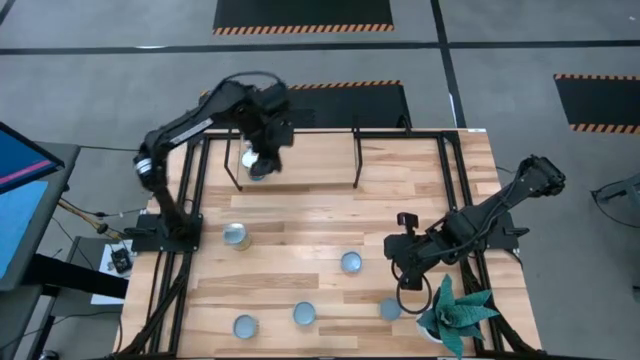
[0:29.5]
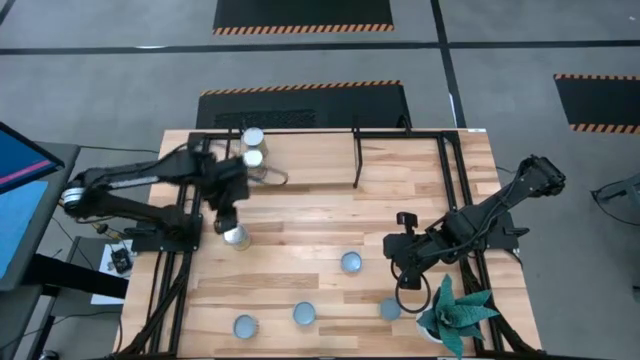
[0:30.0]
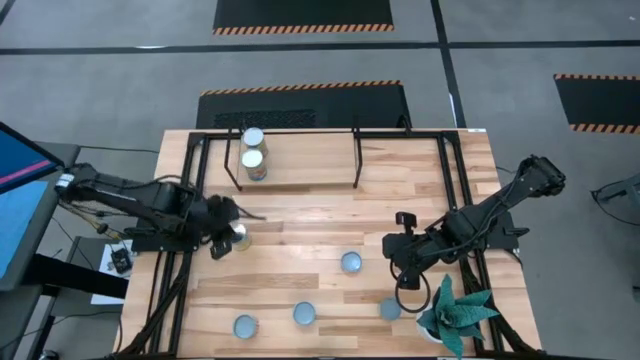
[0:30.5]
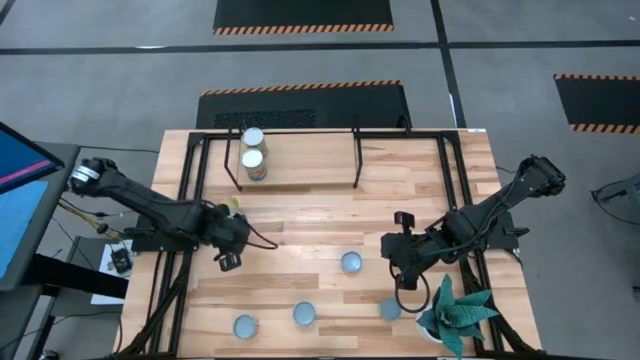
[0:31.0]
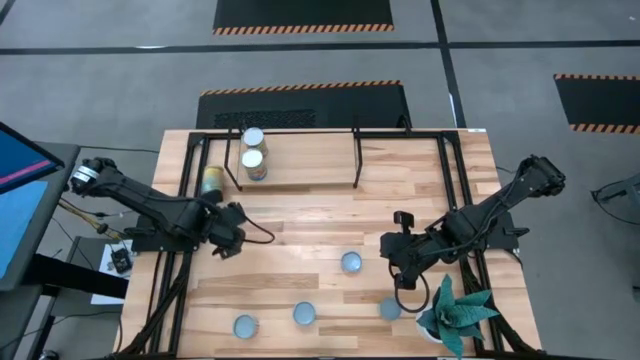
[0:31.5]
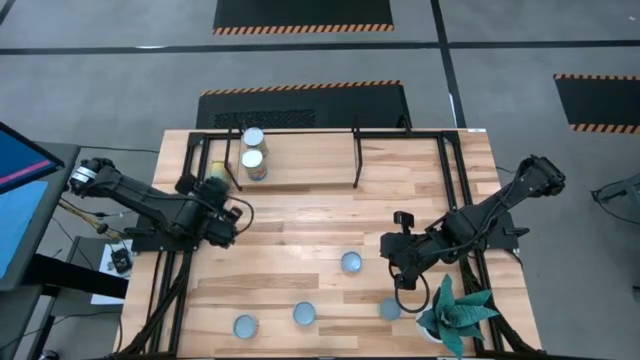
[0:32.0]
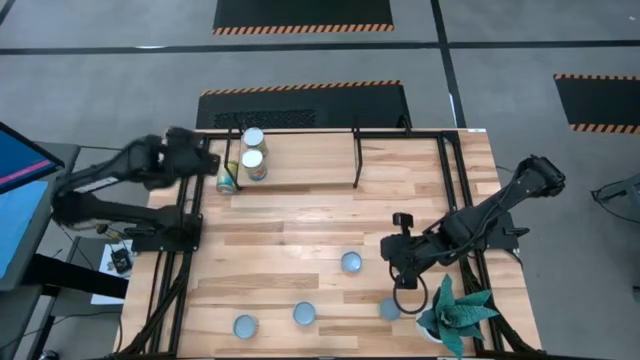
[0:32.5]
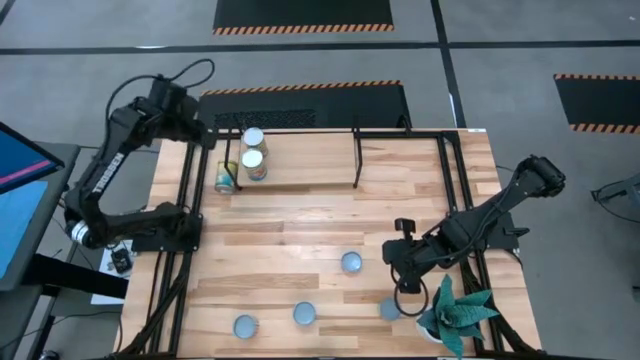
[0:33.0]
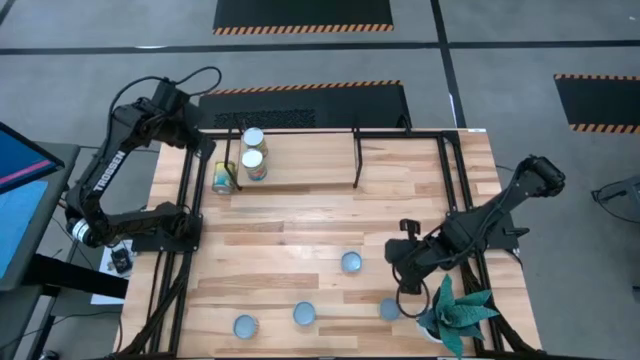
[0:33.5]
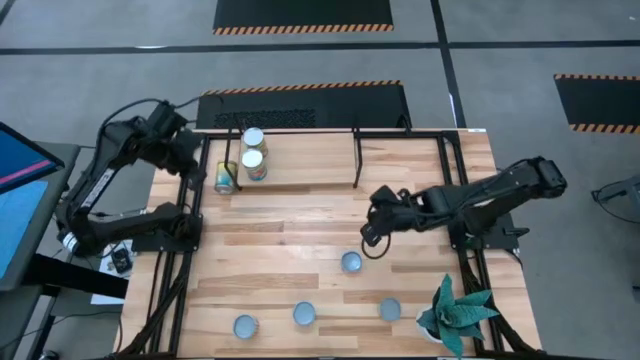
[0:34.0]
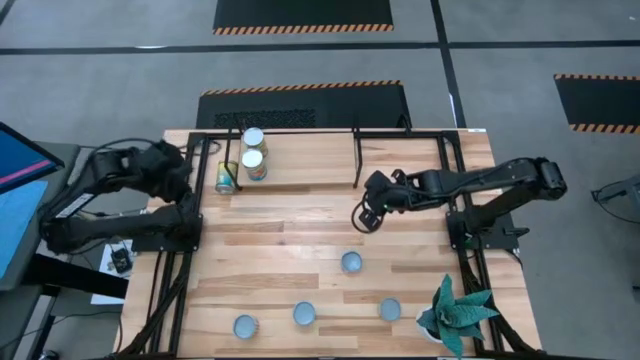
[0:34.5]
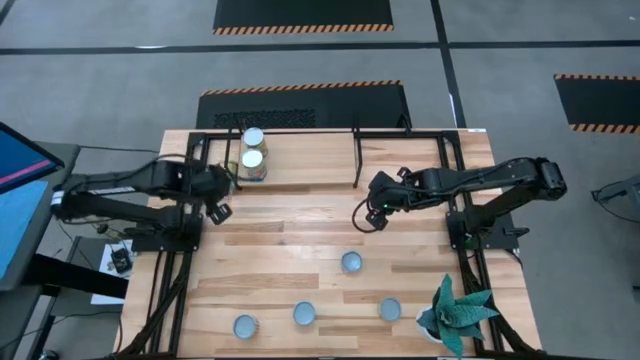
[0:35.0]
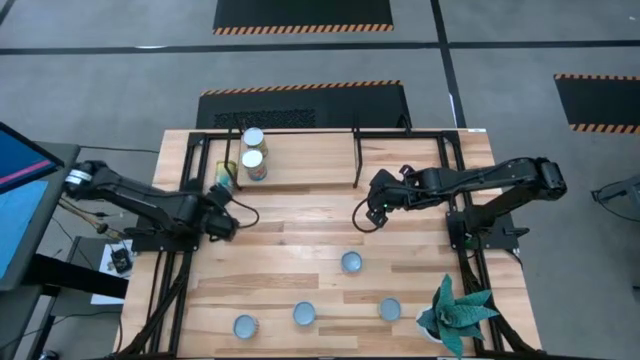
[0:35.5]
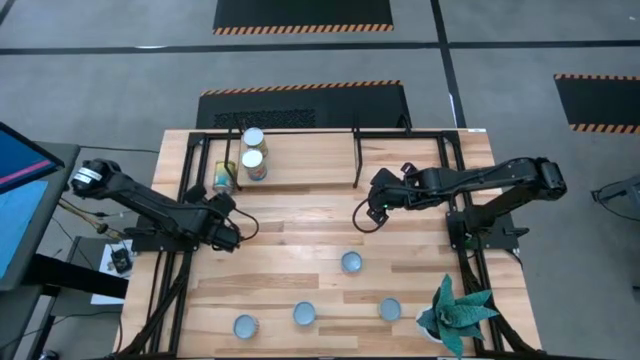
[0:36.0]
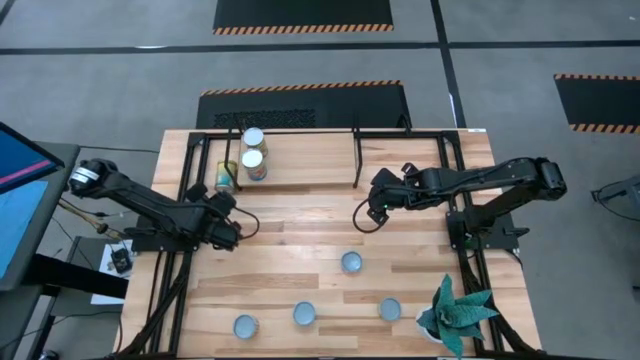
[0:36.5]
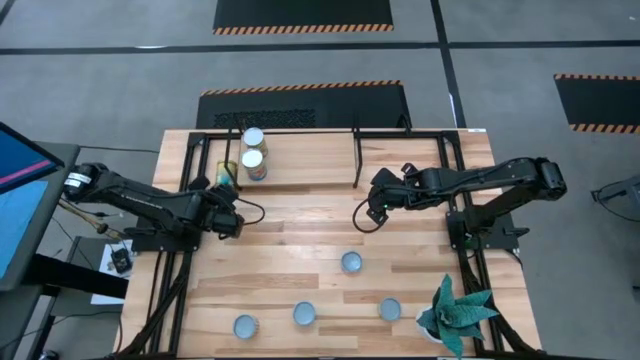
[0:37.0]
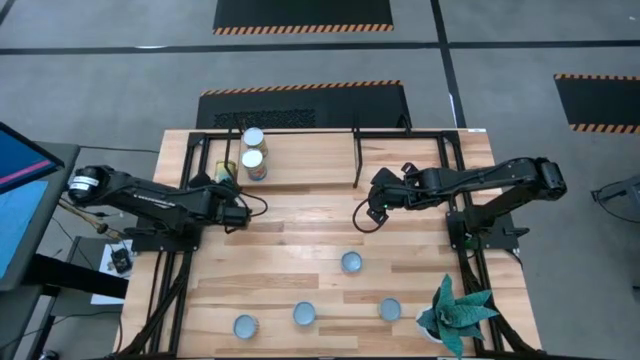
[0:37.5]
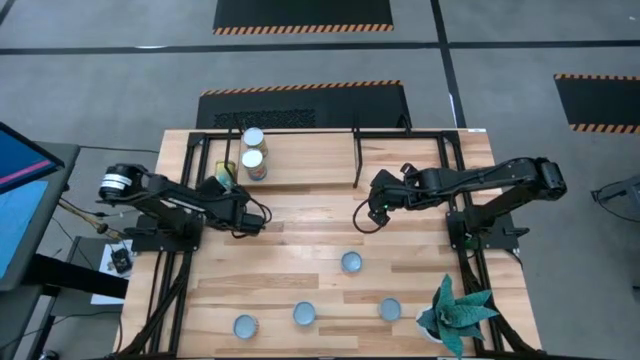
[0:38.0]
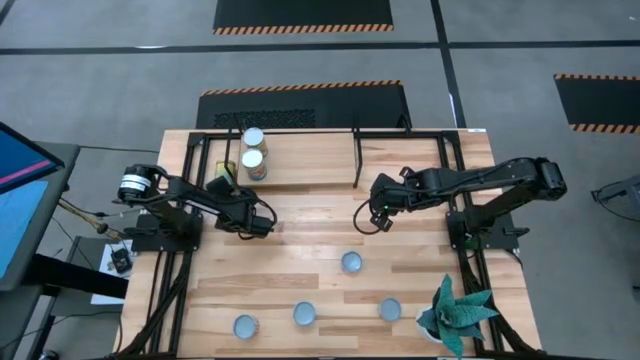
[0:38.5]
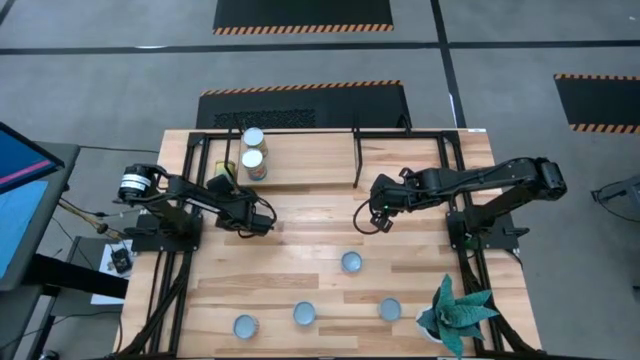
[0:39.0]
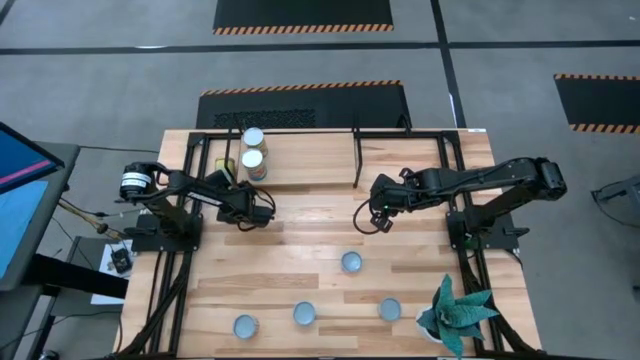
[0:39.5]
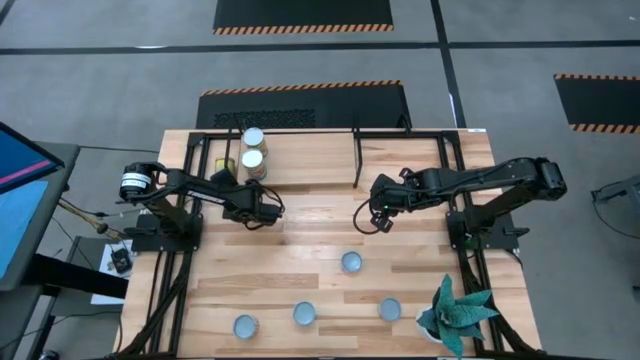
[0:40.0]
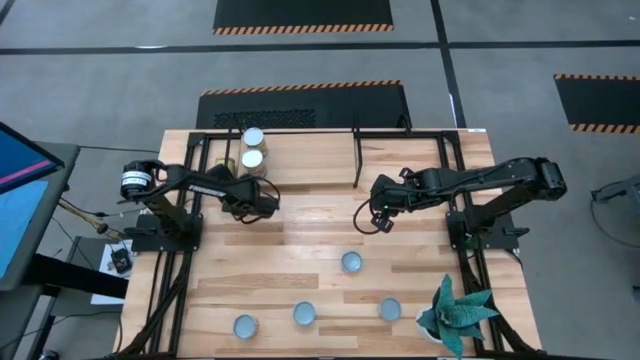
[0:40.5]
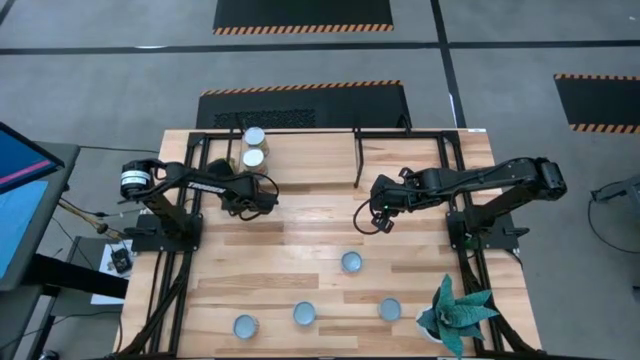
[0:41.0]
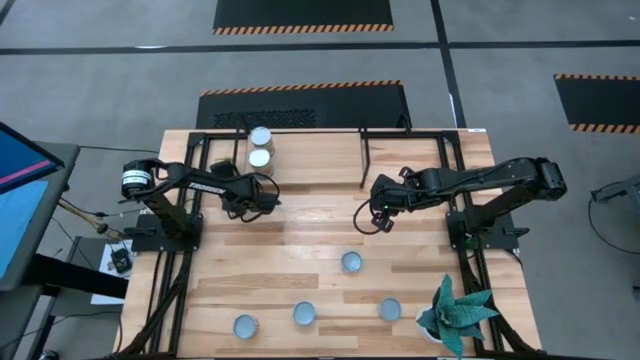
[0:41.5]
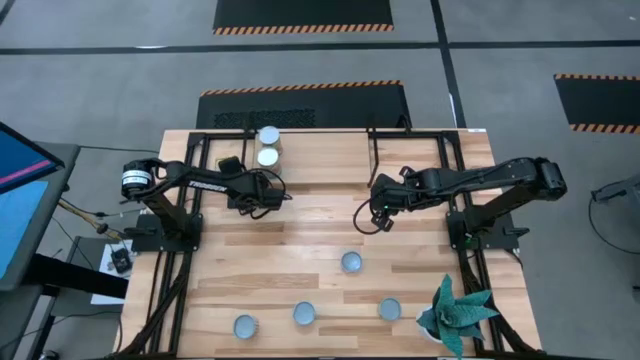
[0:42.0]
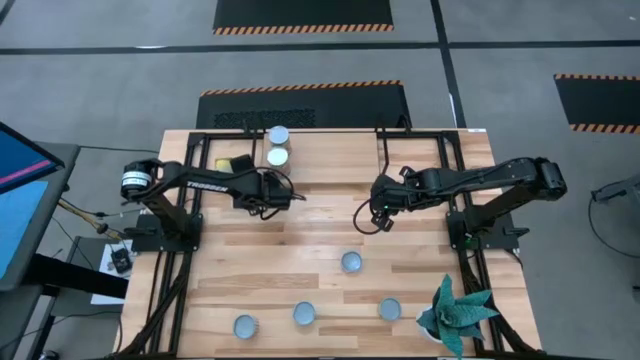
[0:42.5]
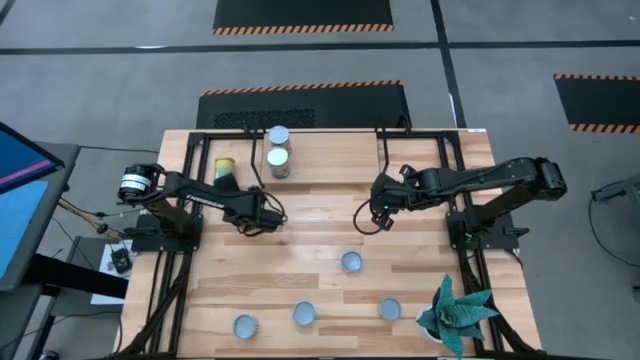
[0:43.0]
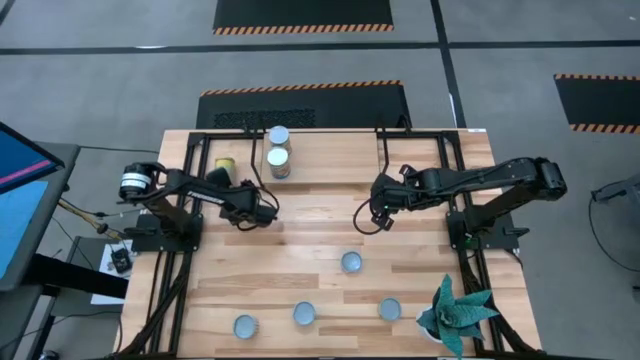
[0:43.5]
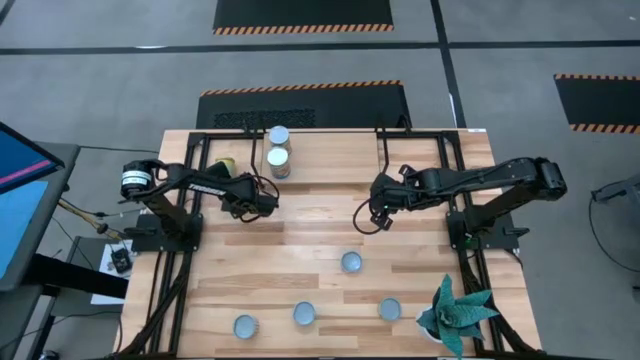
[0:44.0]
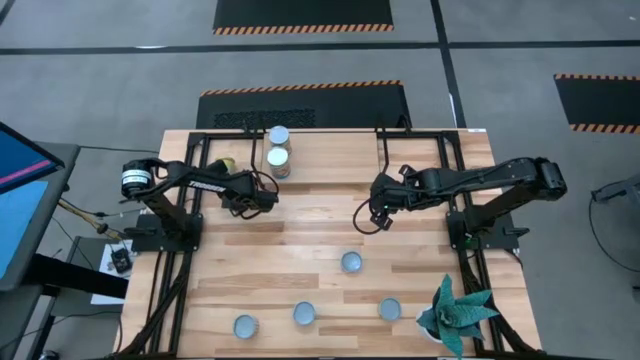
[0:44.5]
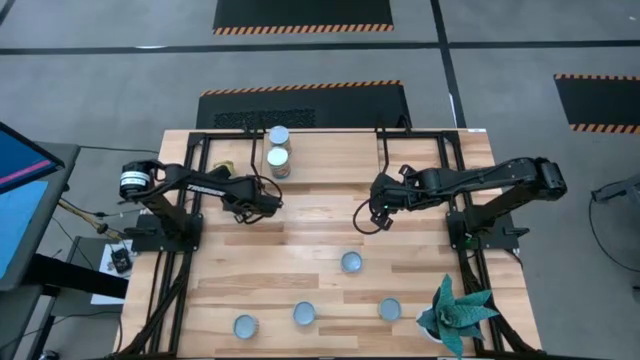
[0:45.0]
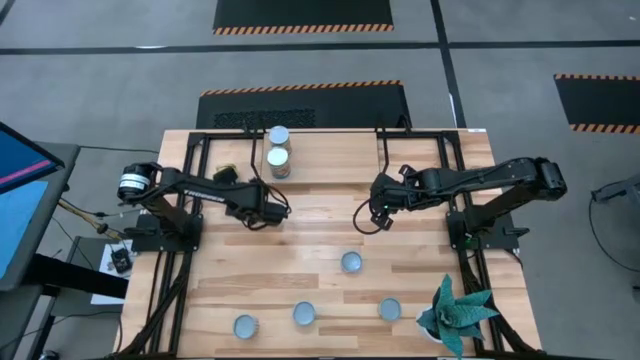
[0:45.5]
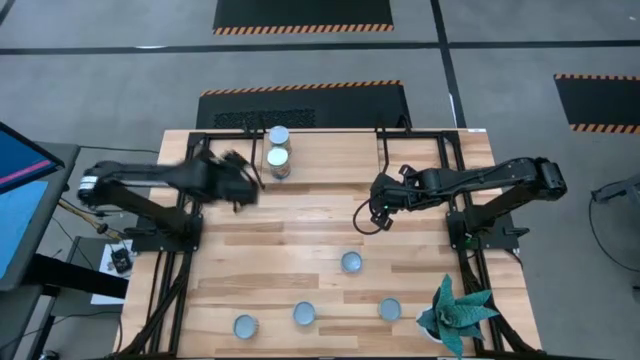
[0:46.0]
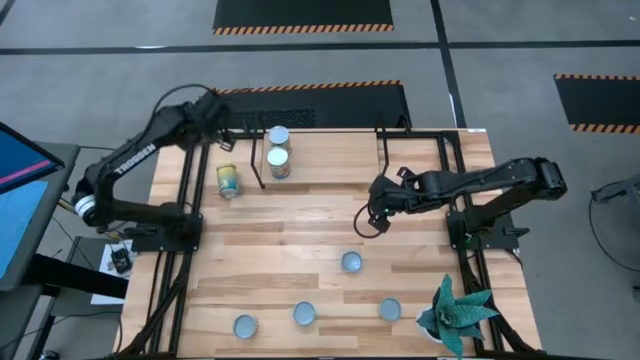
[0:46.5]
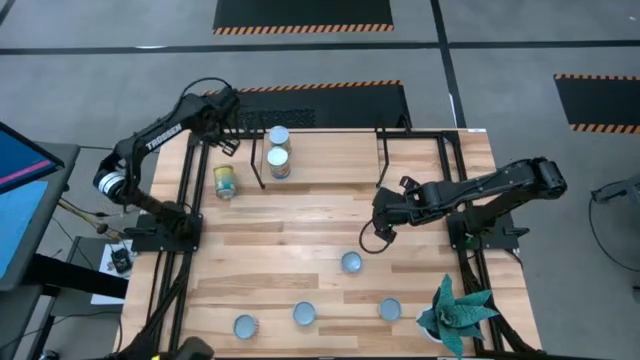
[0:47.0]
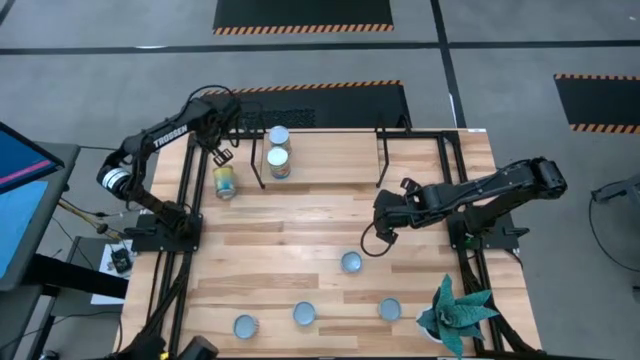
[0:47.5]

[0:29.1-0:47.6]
Task: Pick and place cans onto a shelf
Put the canned carrots on the shelf

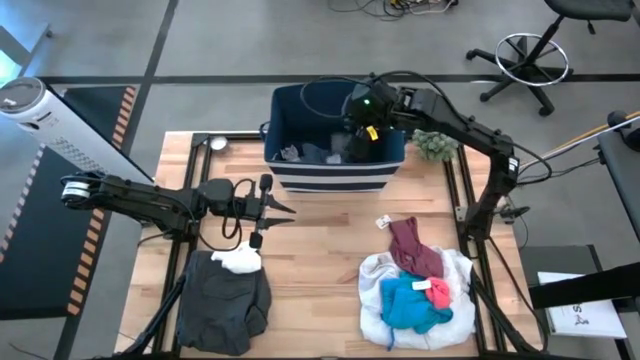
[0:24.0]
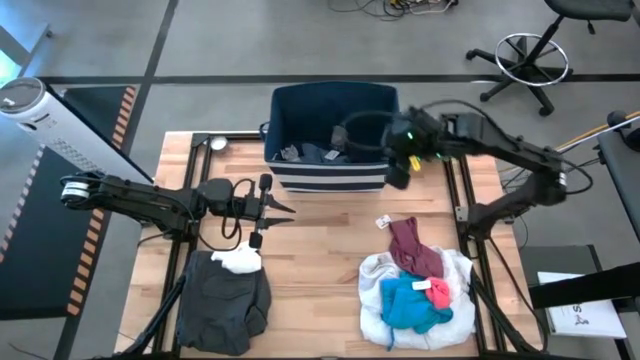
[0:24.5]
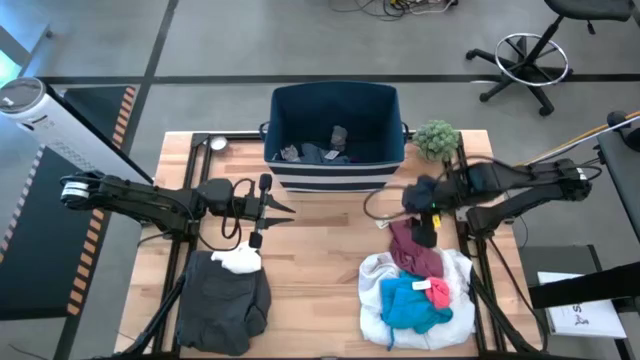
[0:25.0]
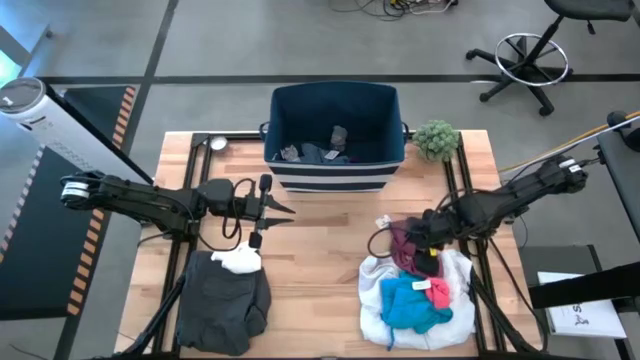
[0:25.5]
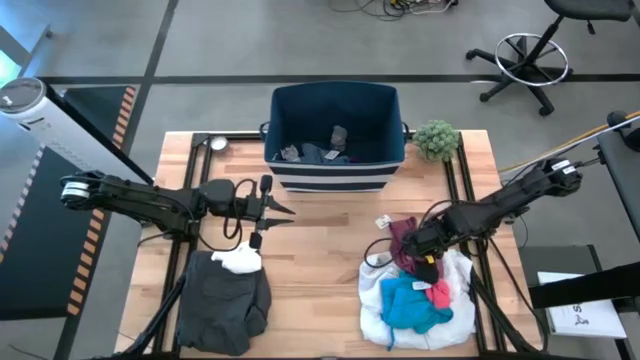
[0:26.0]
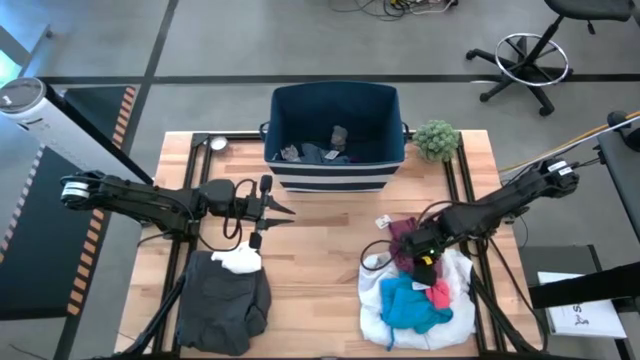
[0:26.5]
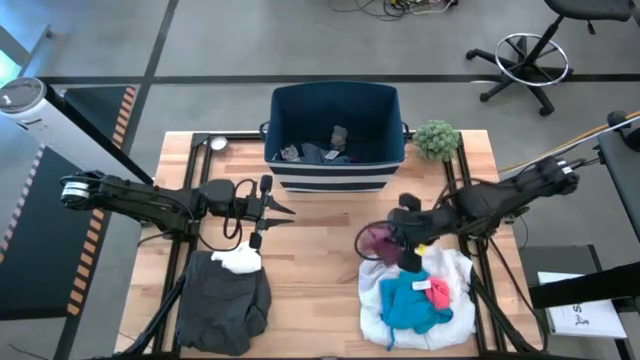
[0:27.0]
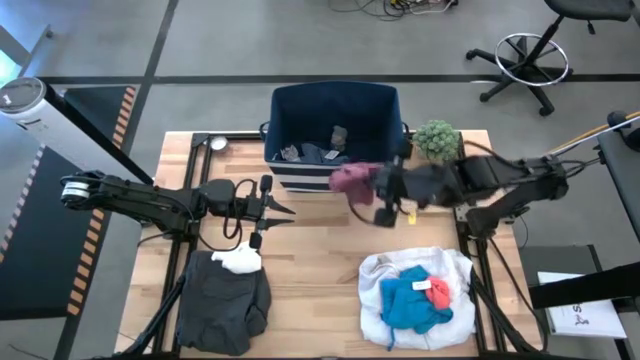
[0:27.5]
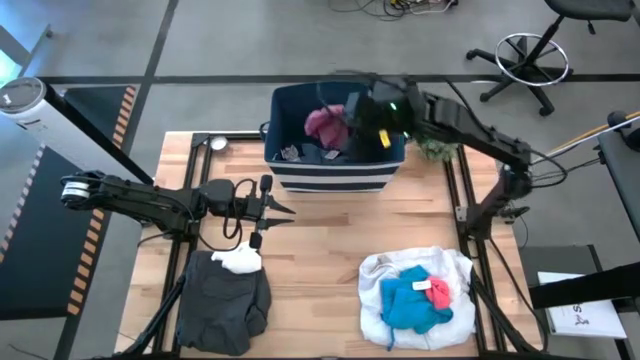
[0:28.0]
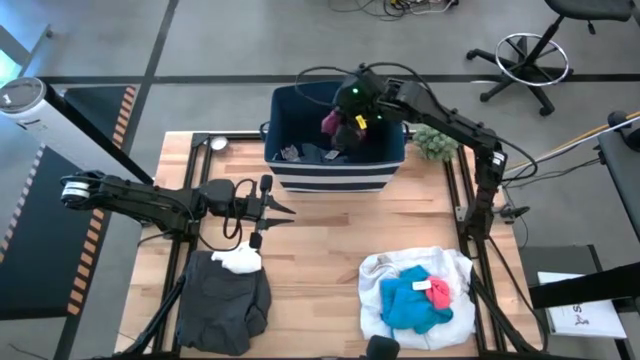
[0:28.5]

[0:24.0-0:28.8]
Task: Sort clothes
Put the red shirt into the laundry organizer
